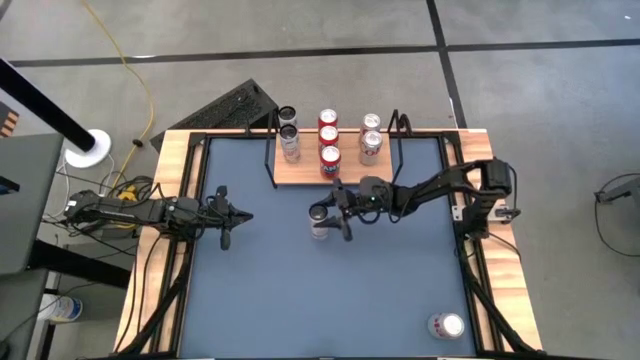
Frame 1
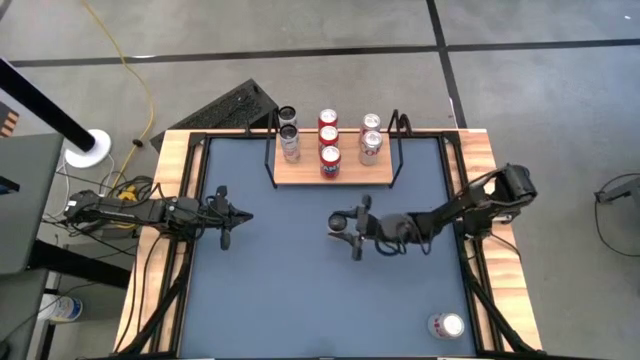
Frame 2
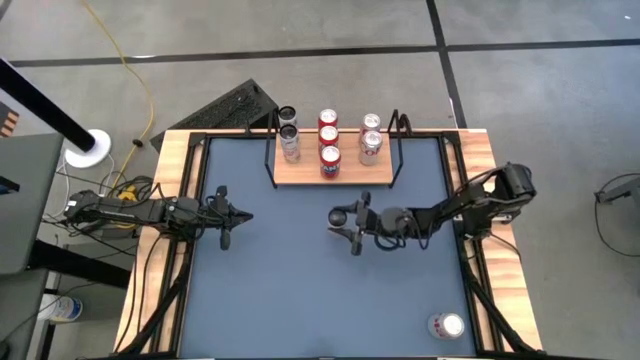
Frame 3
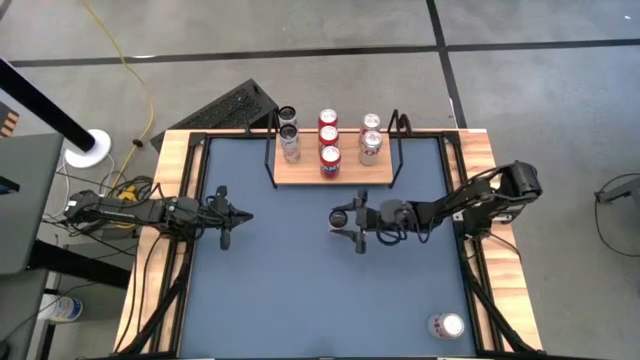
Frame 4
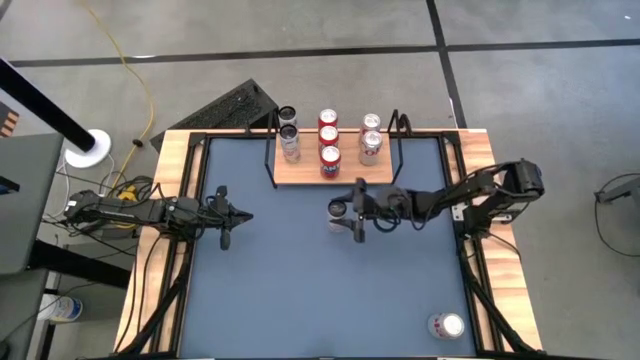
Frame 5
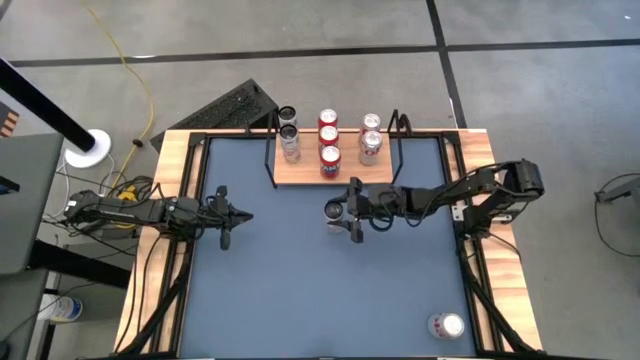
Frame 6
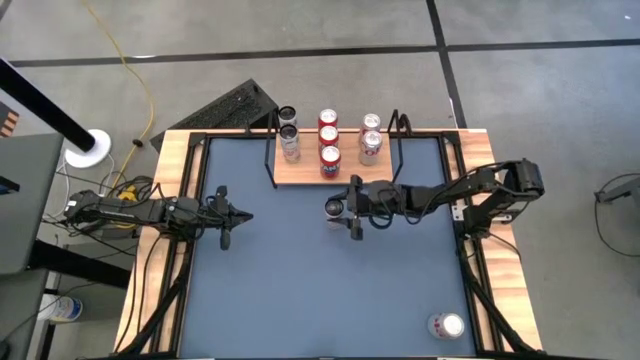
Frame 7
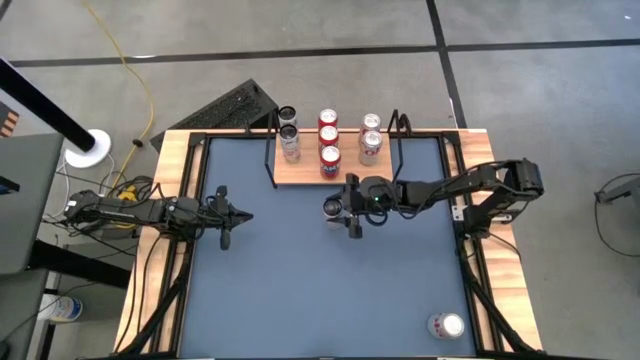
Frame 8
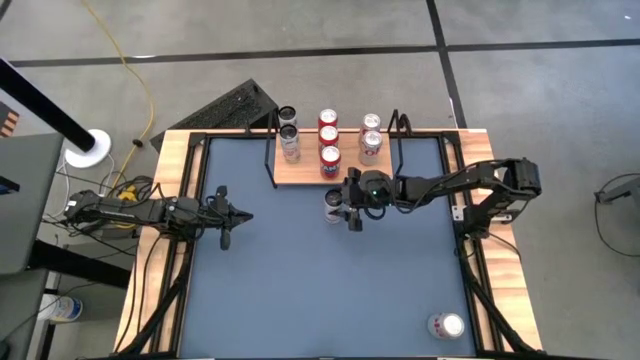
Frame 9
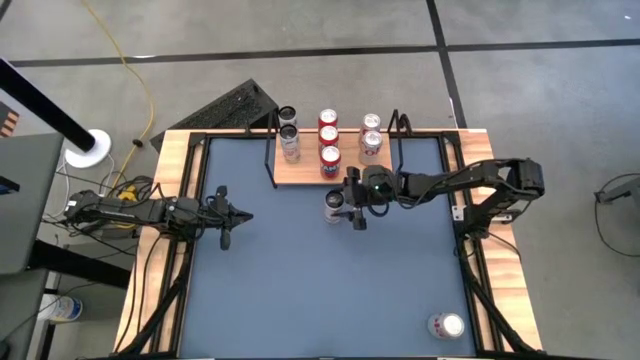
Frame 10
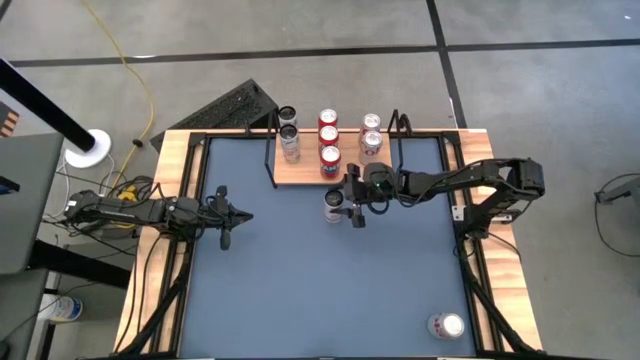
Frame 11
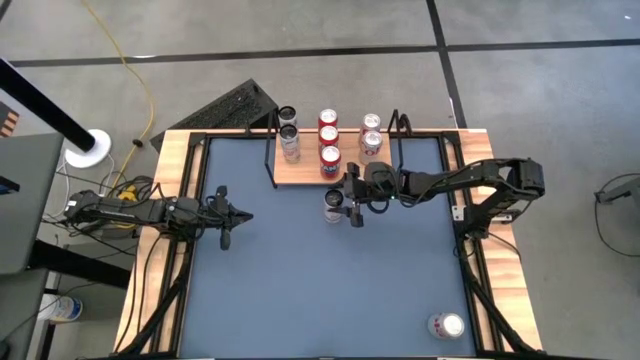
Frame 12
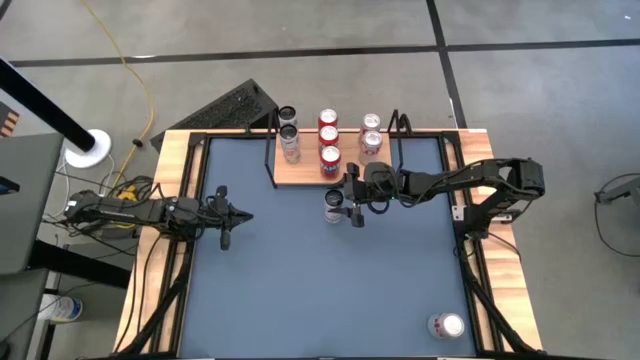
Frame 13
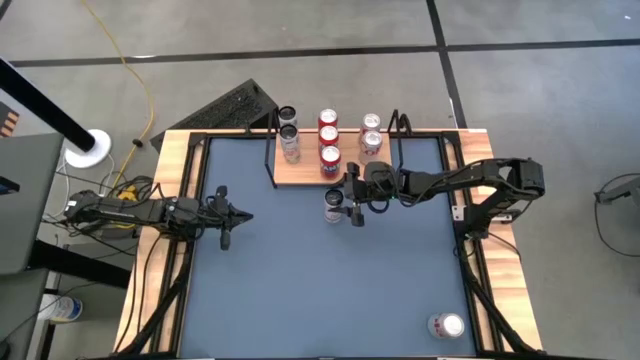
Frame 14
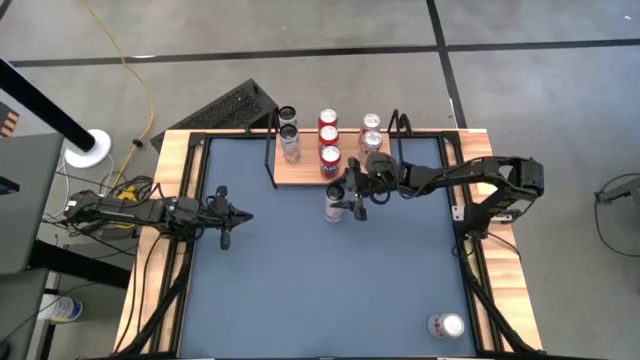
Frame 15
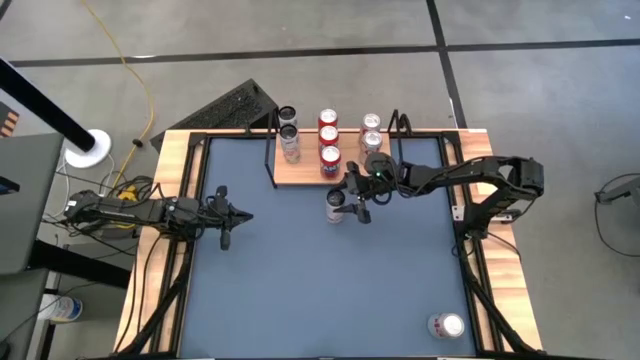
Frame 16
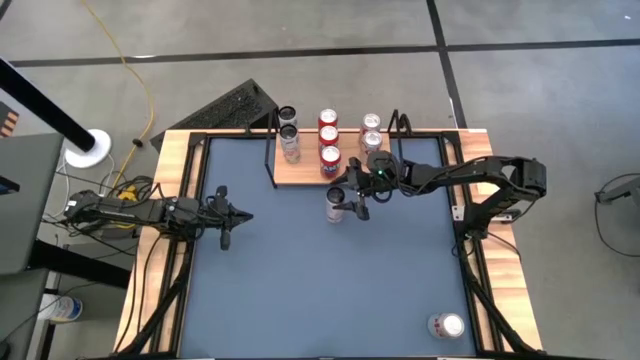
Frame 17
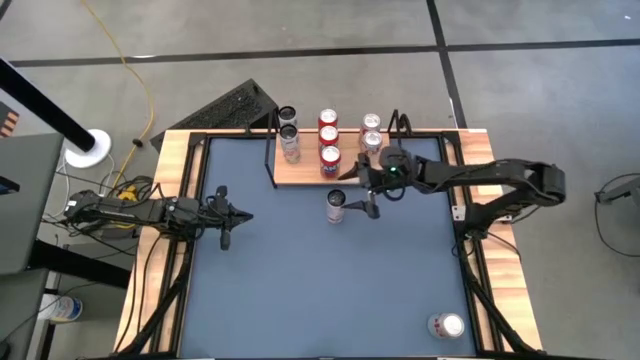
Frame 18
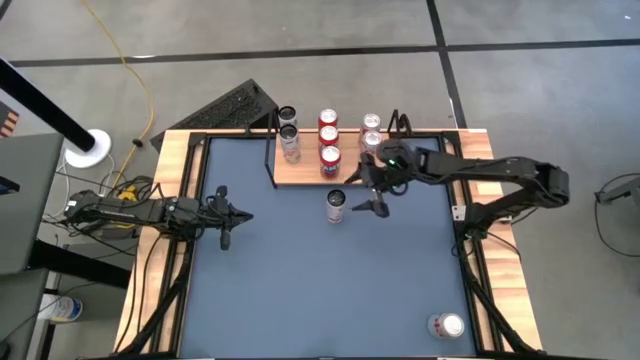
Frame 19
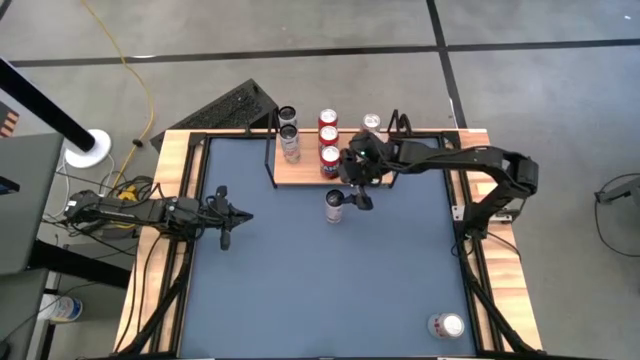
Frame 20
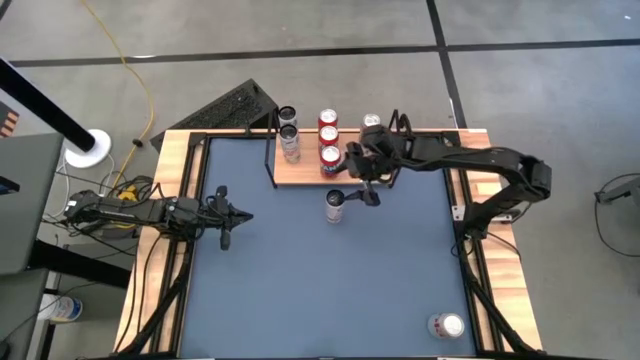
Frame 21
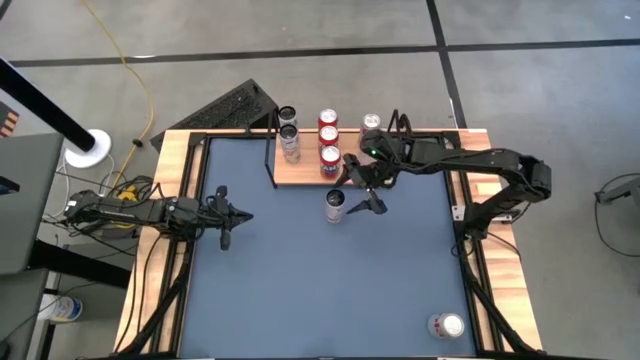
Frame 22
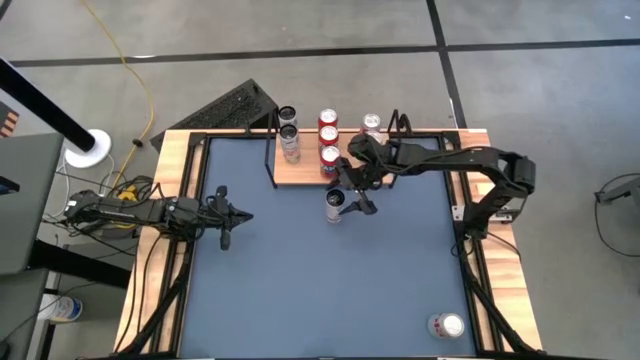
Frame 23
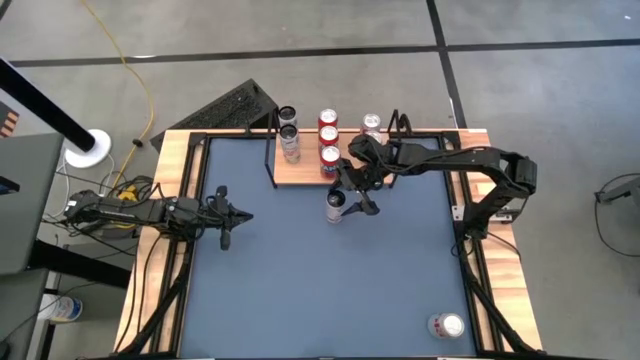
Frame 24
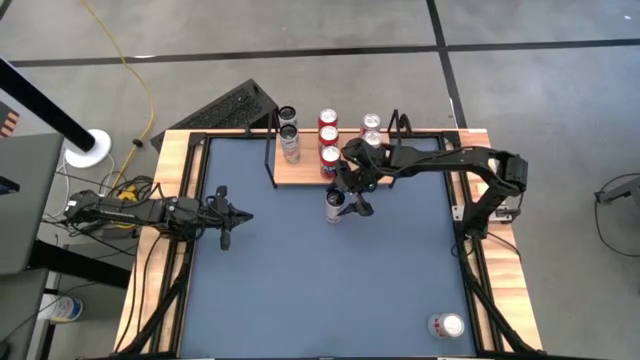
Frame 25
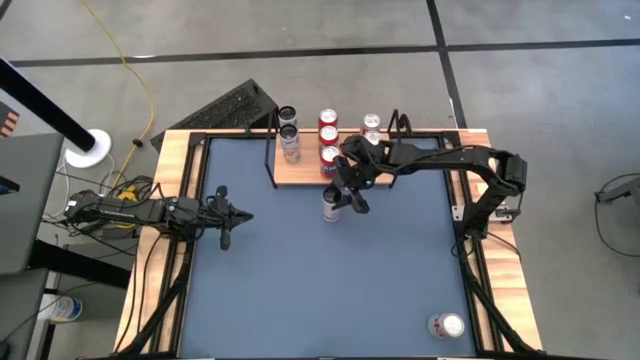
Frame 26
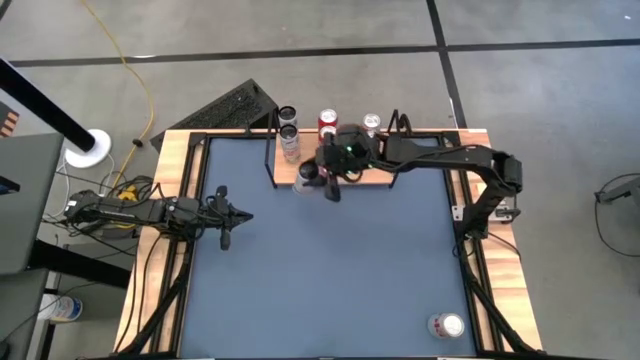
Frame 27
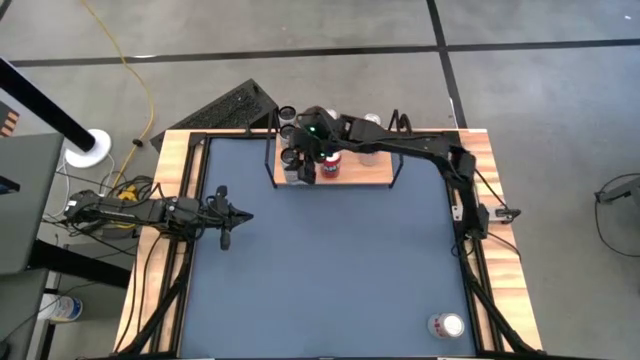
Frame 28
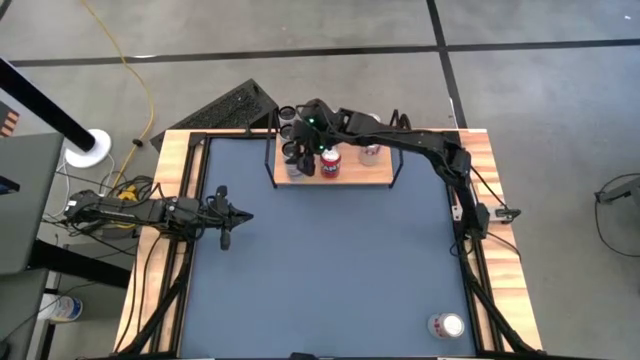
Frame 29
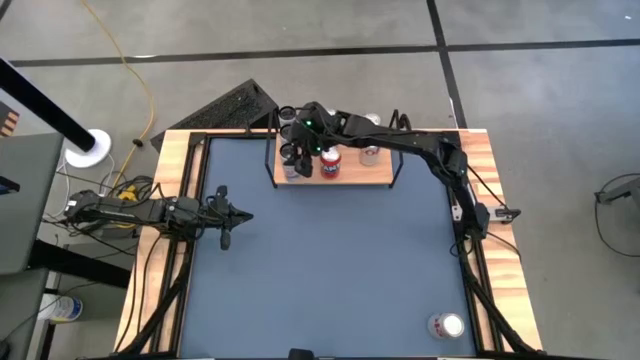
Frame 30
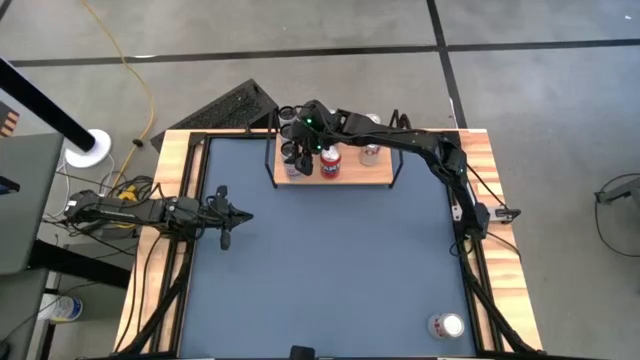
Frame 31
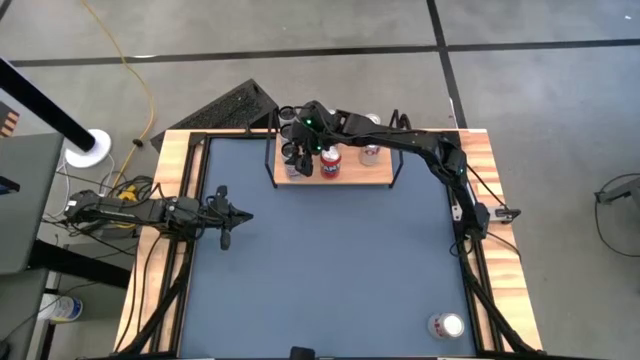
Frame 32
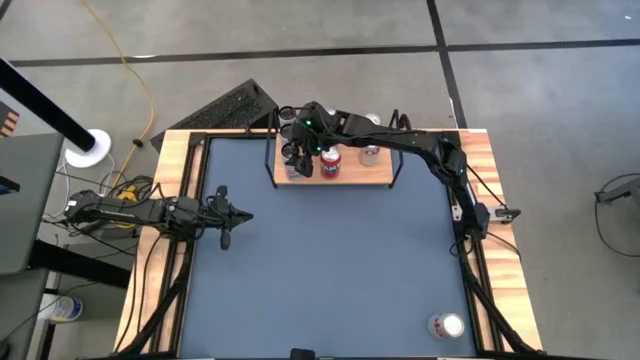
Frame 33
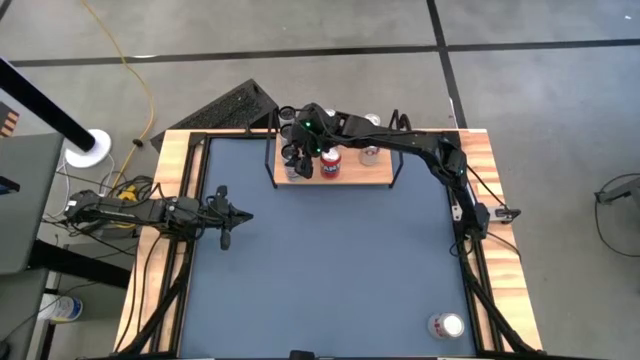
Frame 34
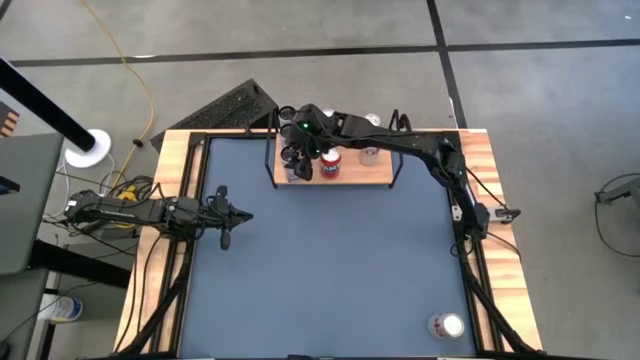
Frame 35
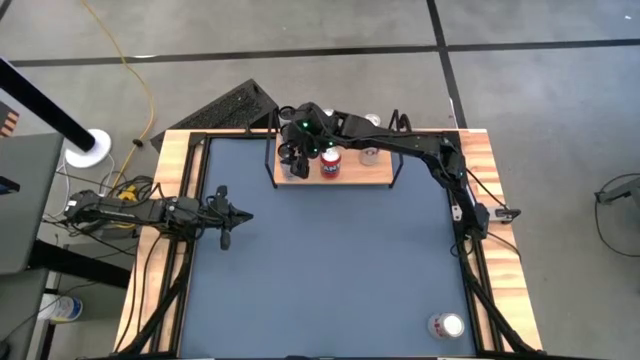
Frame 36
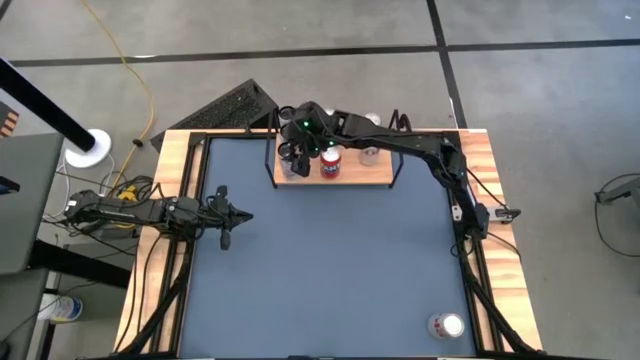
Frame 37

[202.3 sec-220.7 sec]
Task: Place canned beverage on shelf
Put the white-pink soda can on the shelf aligned with the other white-pink soda cans

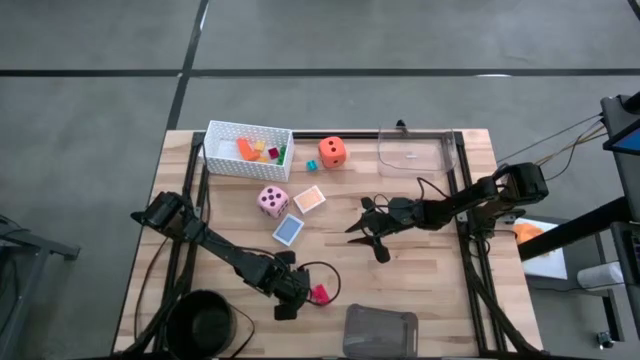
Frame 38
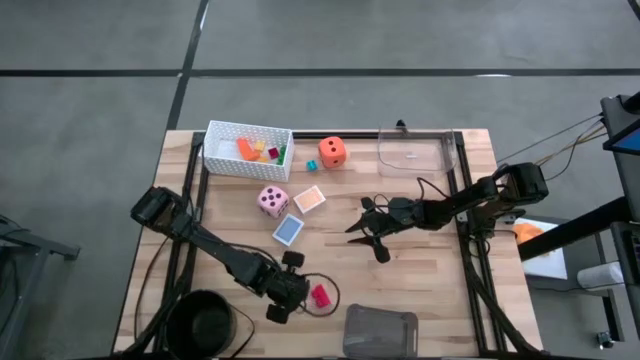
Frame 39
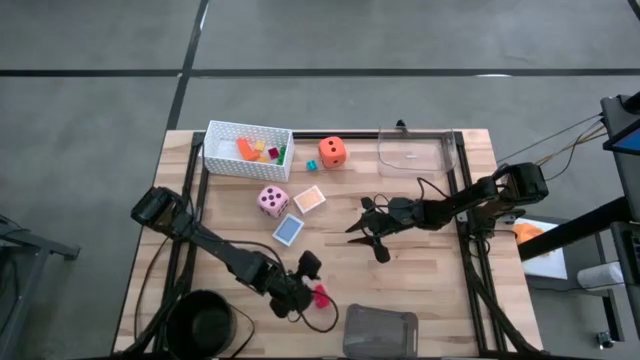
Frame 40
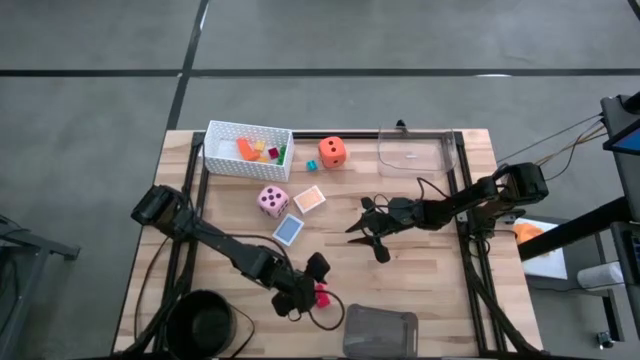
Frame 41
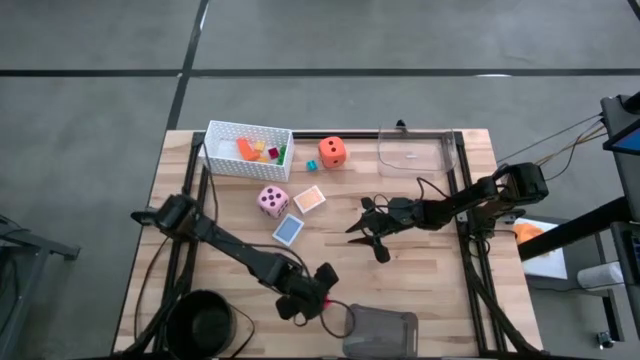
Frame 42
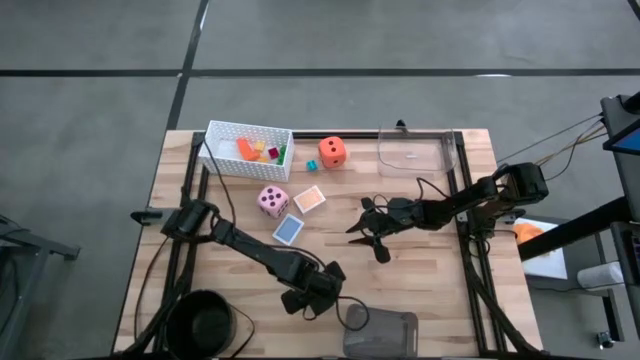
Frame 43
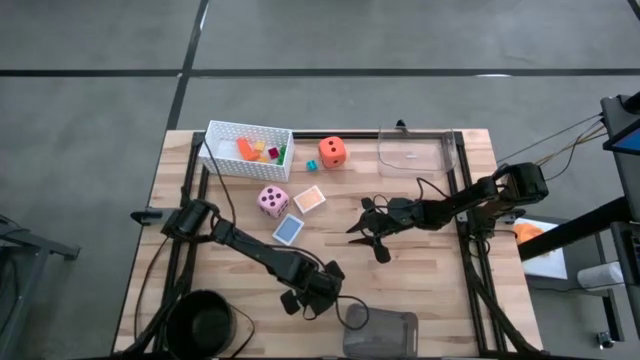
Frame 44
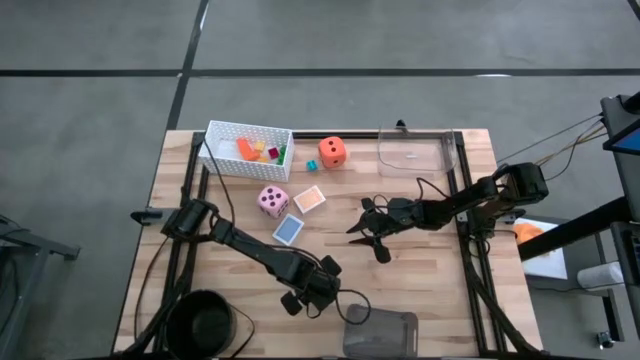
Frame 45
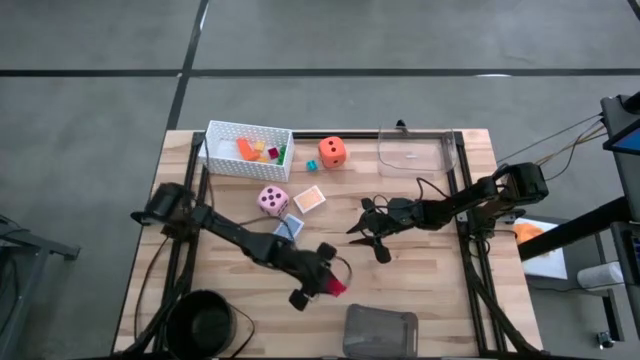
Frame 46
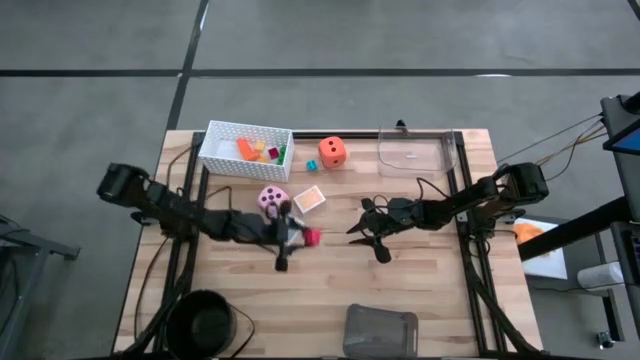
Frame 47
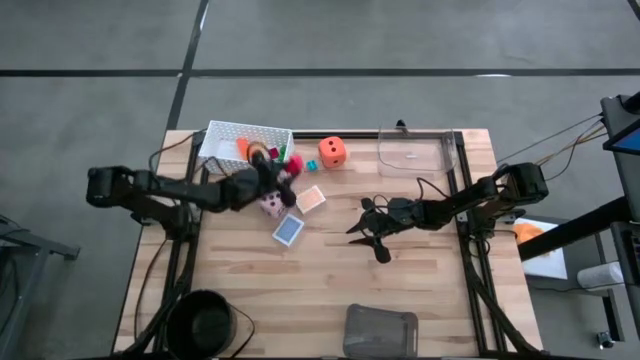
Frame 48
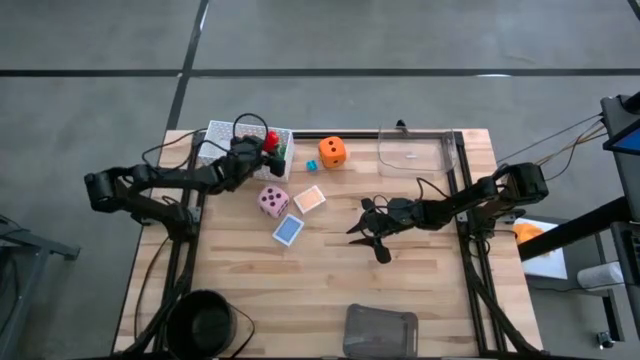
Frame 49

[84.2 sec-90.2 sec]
Task: Pick & Place Toys
Put the large red game piece into the white bin
